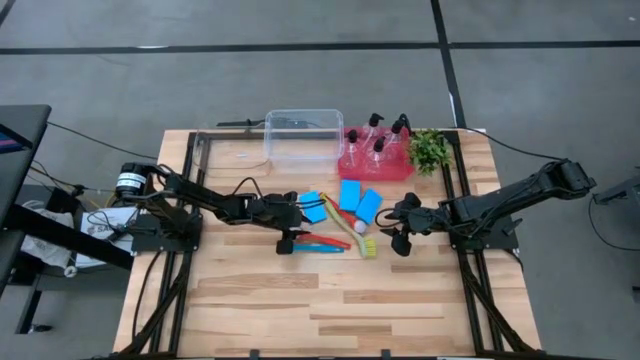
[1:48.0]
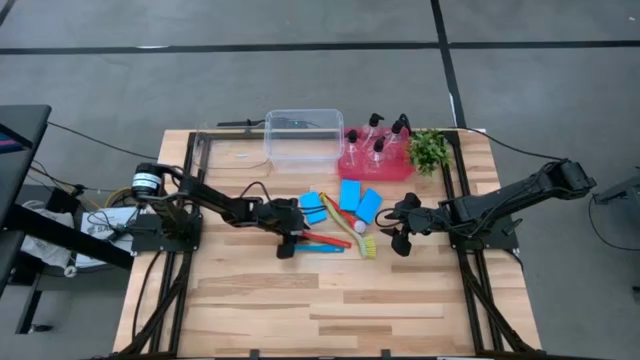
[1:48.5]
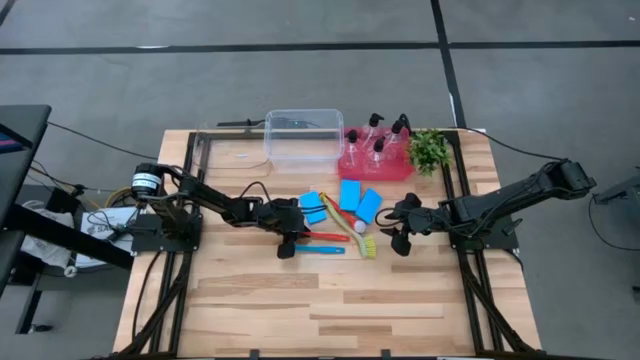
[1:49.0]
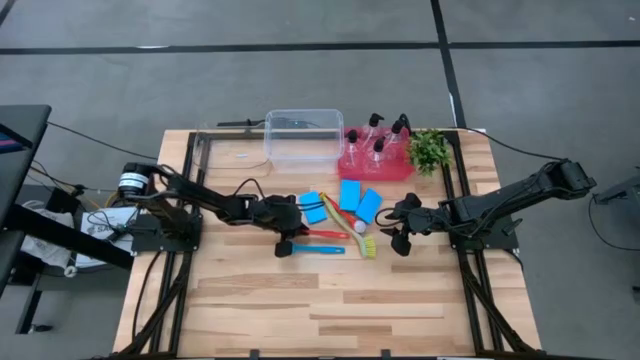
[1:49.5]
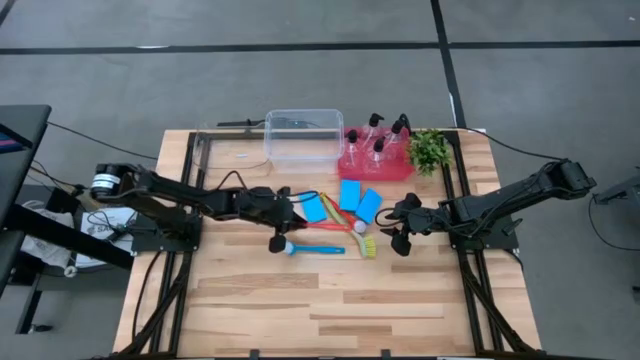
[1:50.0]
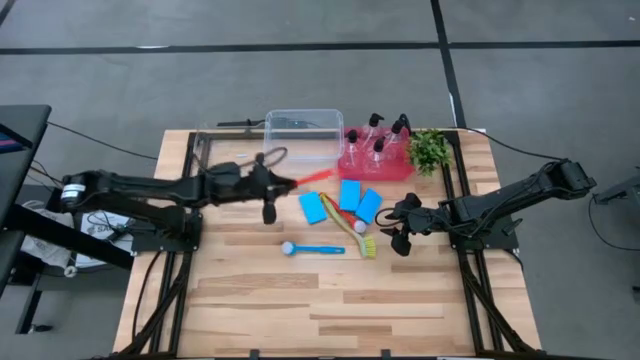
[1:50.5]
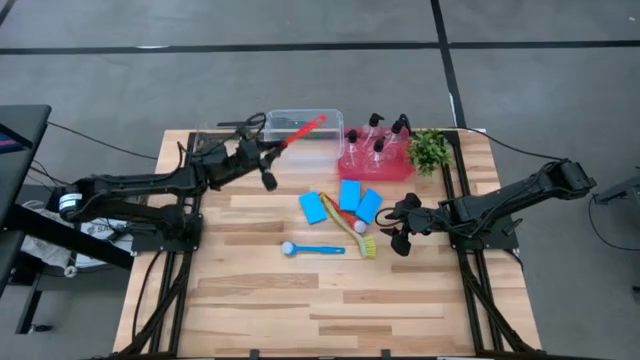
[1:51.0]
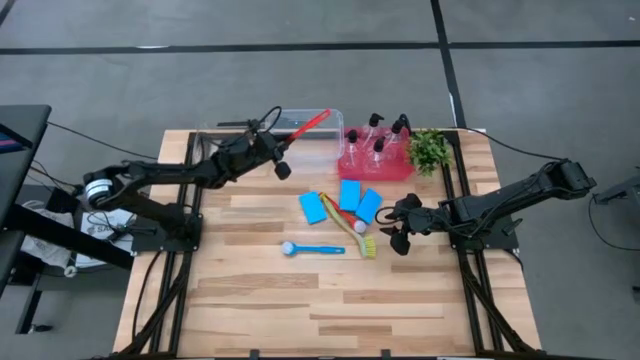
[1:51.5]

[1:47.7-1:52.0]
Task: Pick & Place Kitchen Sink Supplies
Put the bottom red toilet brush into the white bin

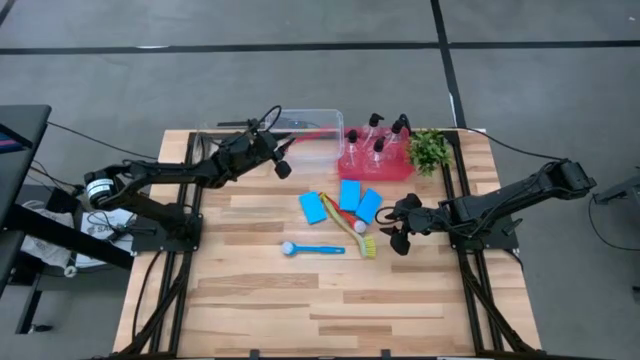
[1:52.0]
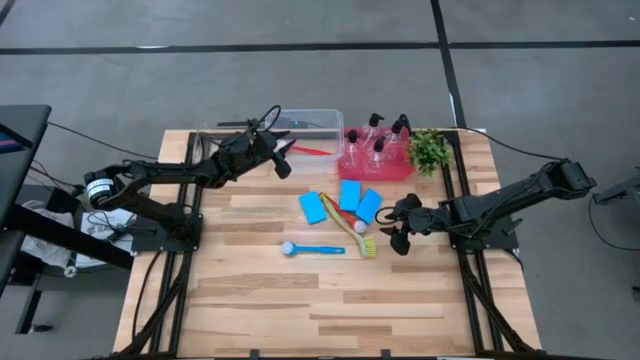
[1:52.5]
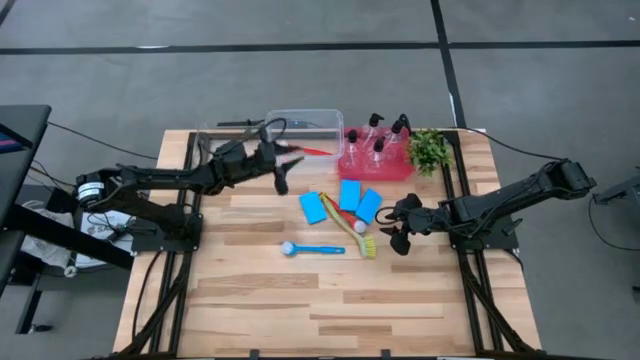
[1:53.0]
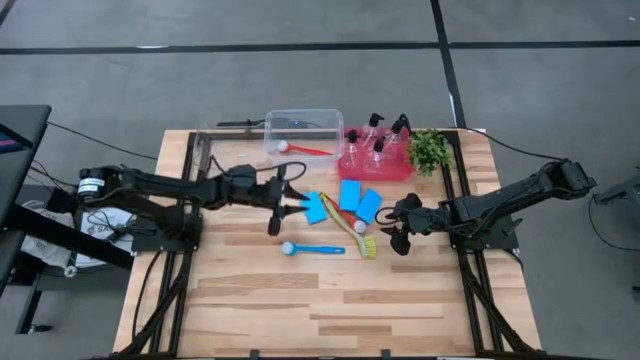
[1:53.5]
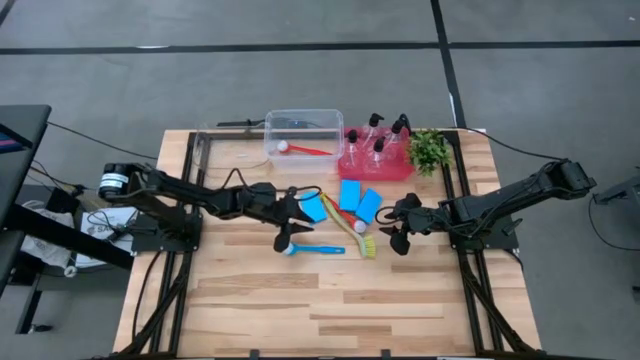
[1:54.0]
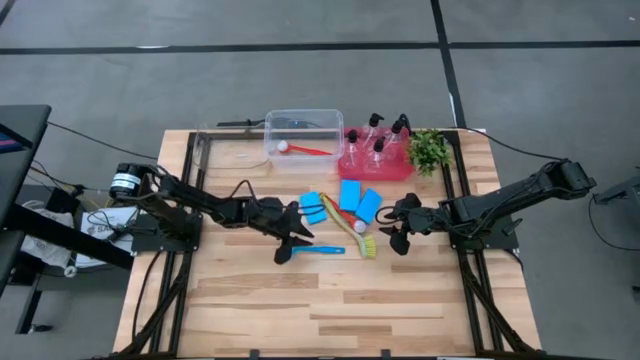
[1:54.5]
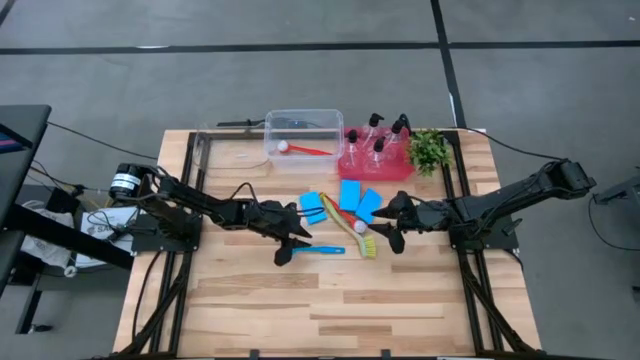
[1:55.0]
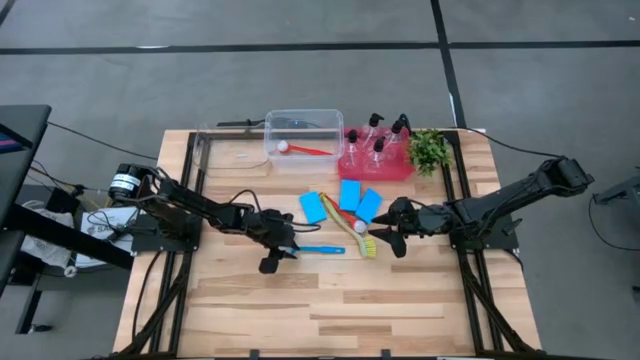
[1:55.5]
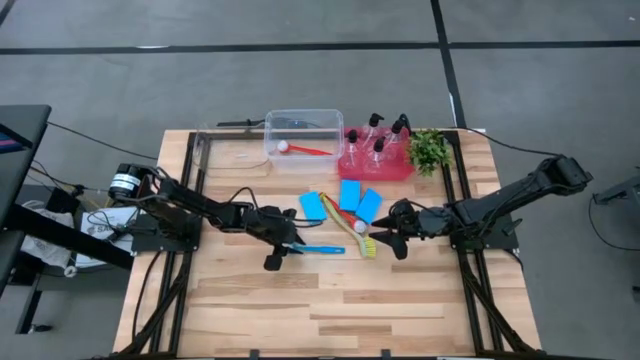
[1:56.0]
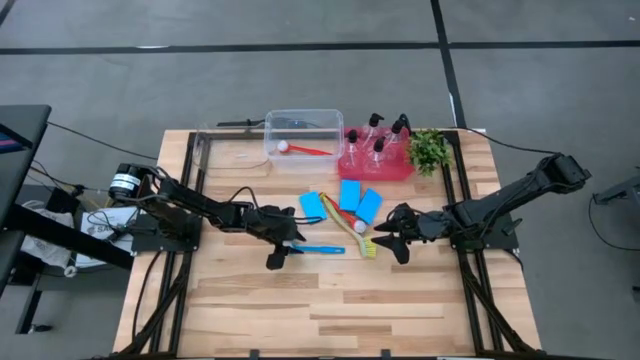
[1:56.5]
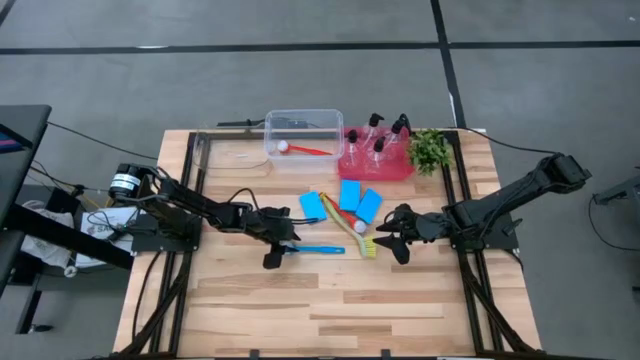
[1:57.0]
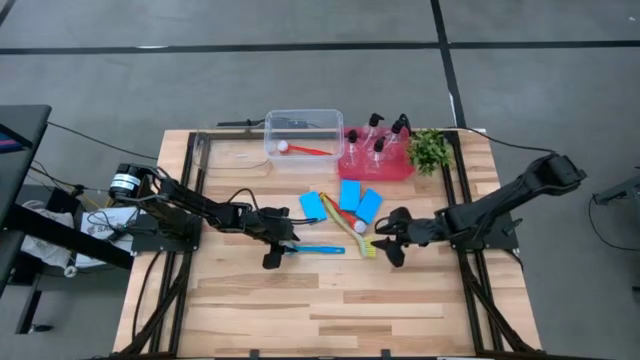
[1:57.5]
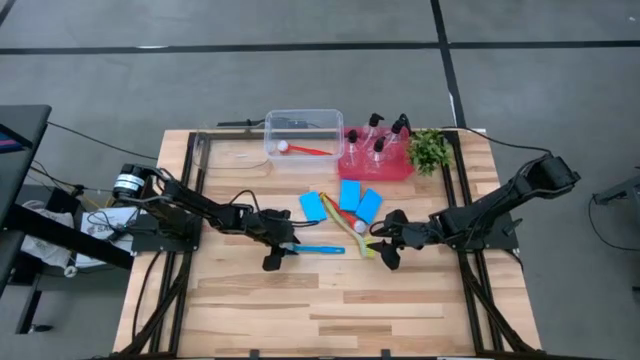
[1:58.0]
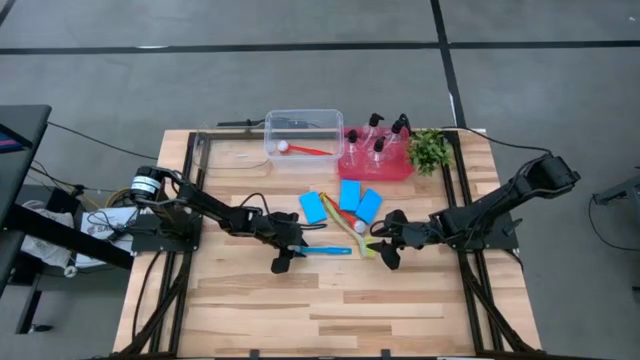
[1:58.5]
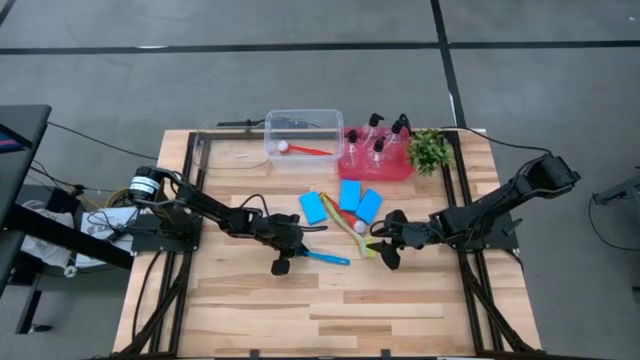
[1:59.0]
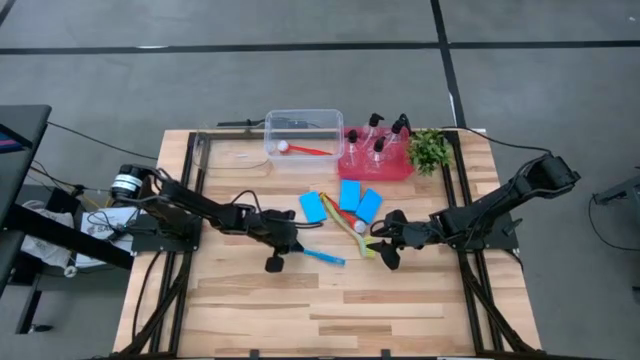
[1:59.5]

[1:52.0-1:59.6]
Put the blue toilet brush into the white bin

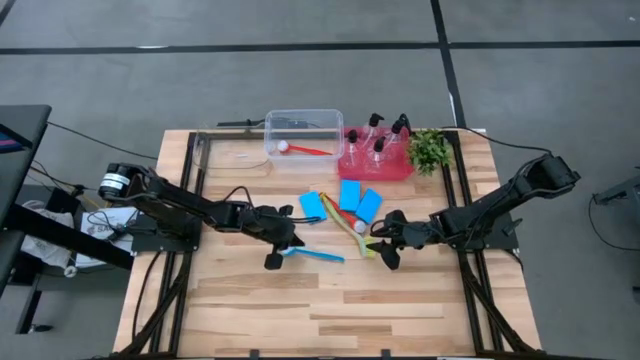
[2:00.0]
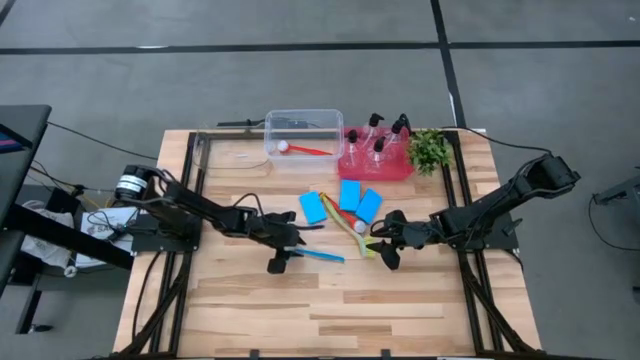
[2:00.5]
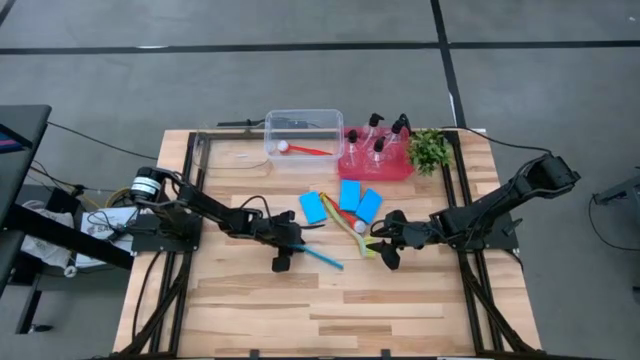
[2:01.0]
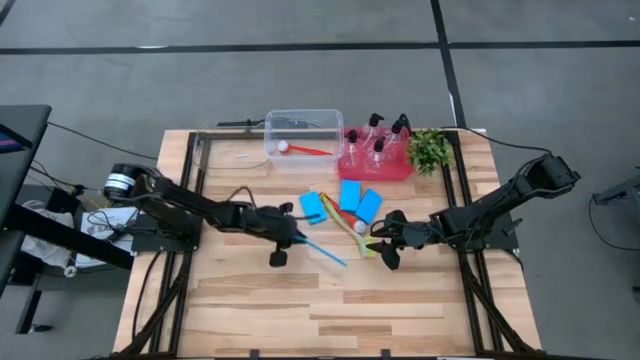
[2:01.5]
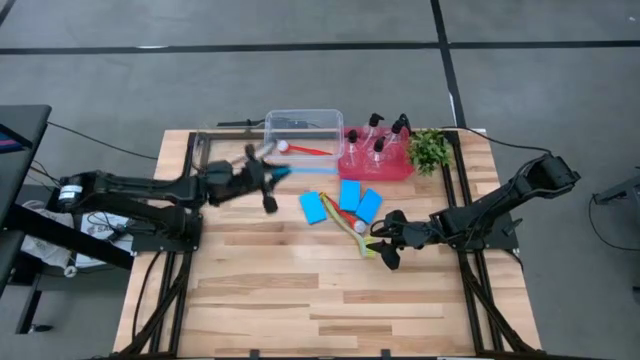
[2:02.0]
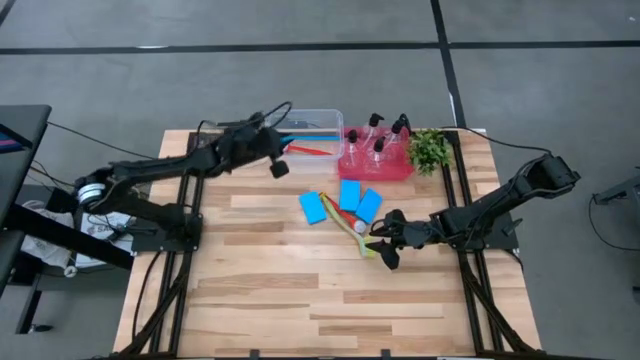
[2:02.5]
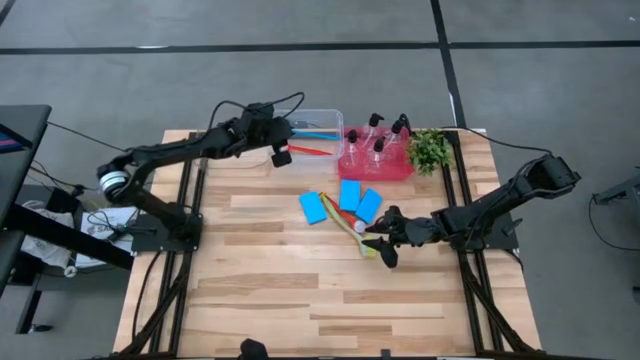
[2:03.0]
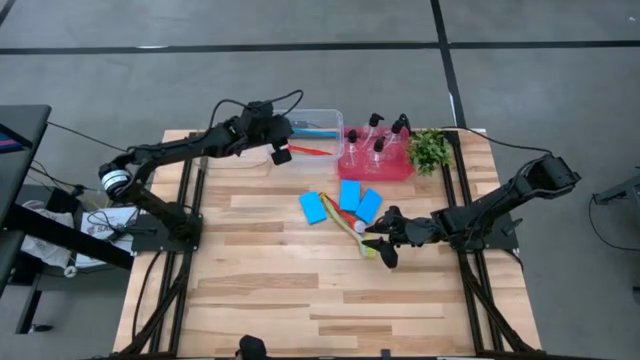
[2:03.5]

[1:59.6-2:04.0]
Put the blue toilet brush into the white bin

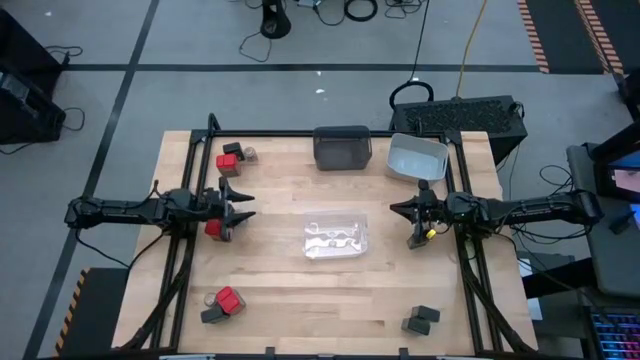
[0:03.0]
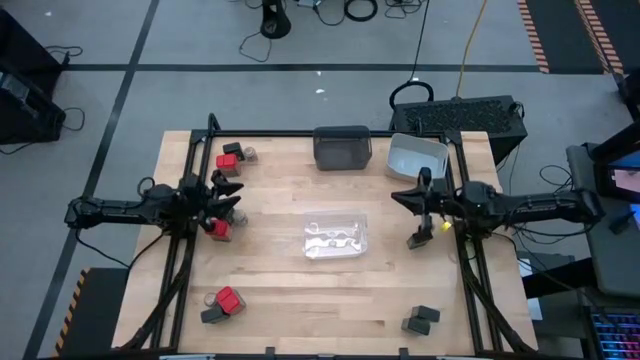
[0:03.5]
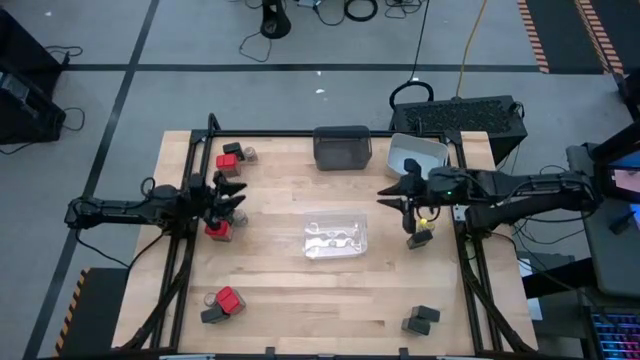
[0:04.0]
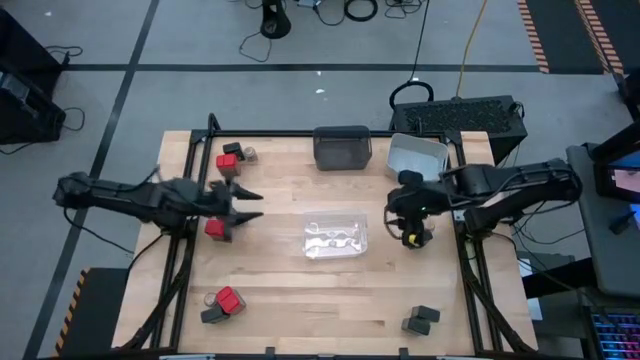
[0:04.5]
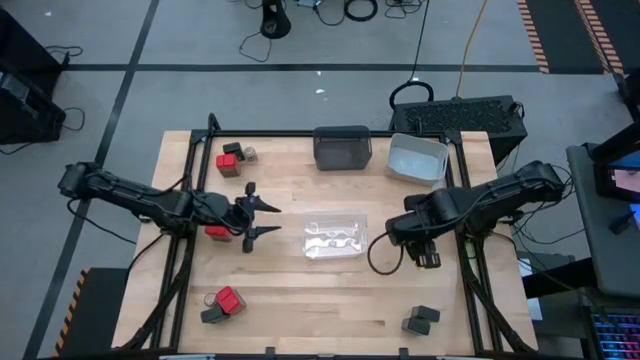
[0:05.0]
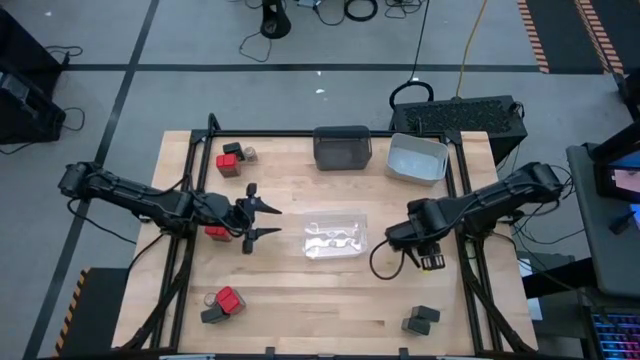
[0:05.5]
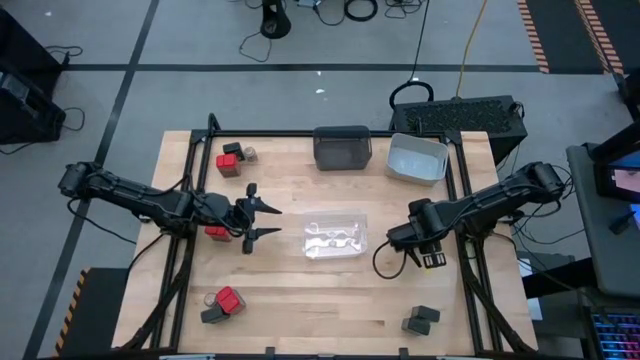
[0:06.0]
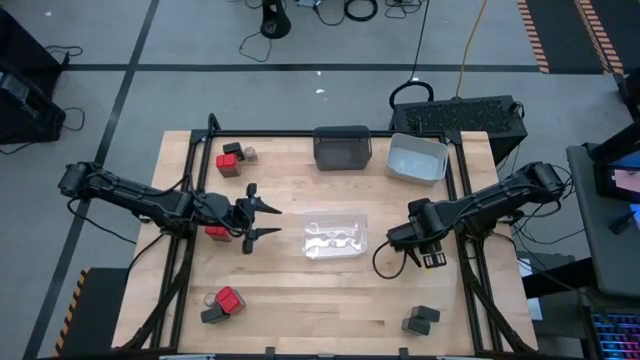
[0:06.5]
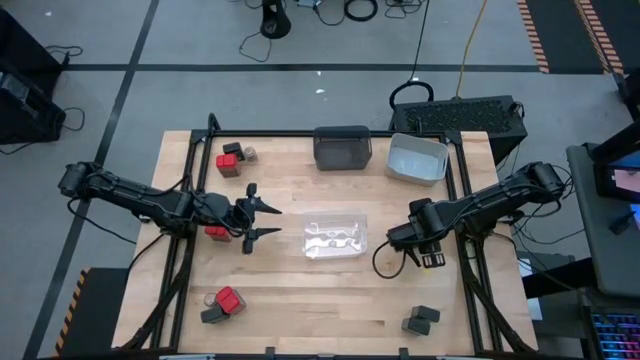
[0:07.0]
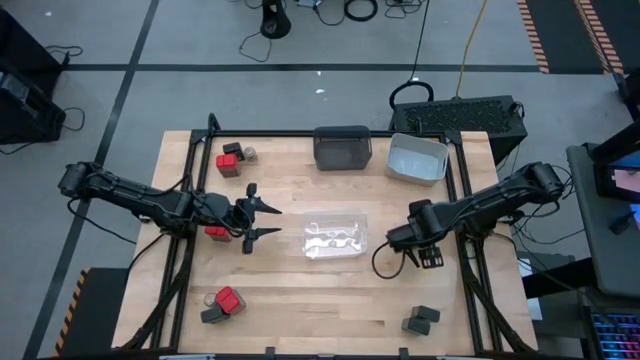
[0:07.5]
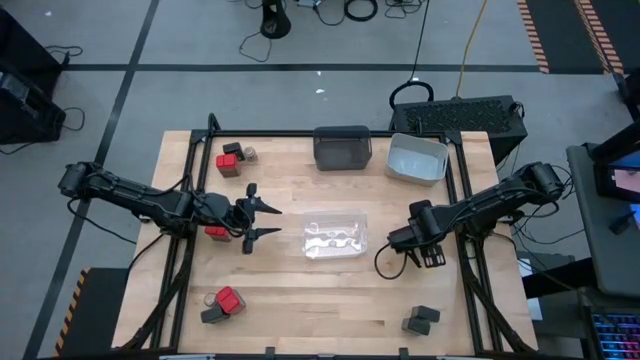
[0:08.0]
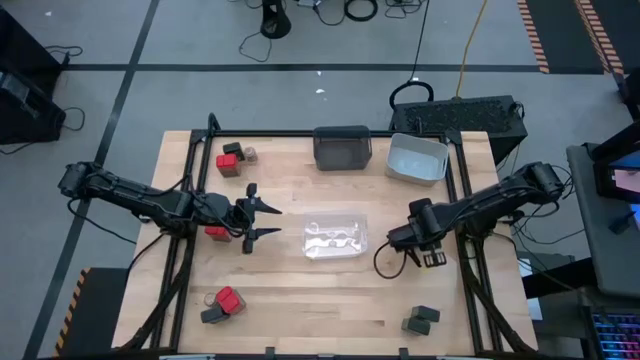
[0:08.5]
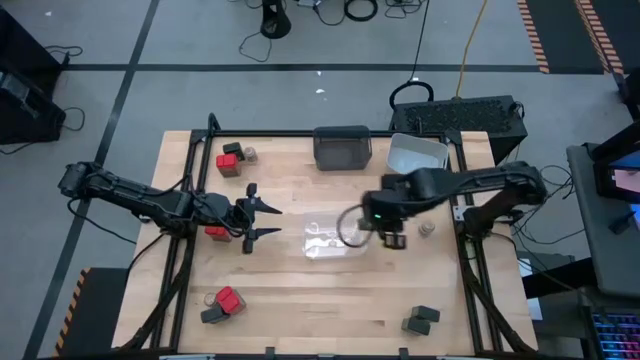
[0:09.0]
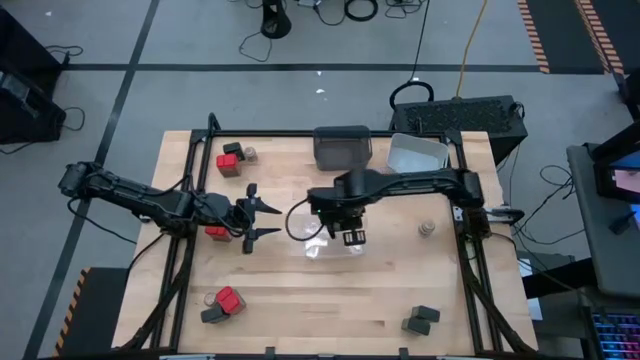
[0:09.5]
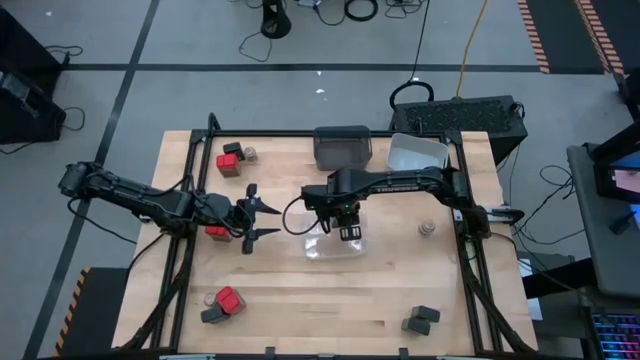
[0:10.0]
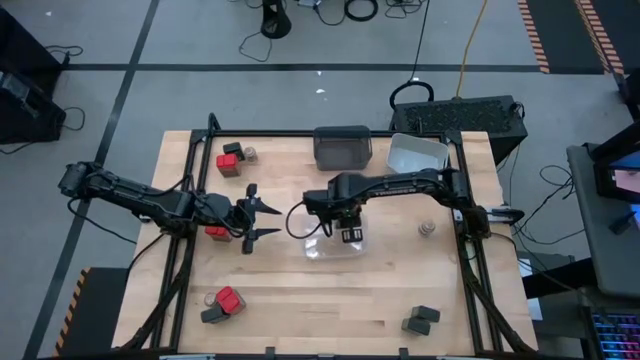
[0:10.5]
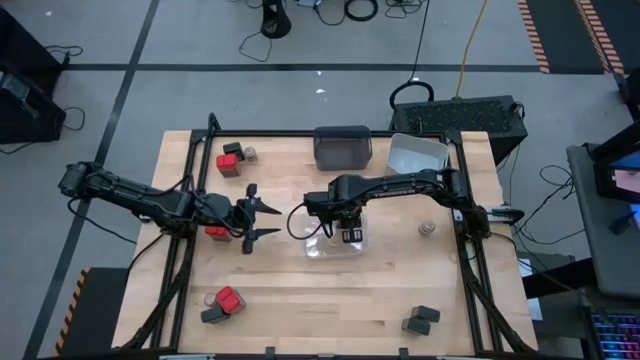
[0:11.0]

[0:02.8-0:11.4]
Task: Sort spices by type
Put the black seasoning can into the transparent bin
